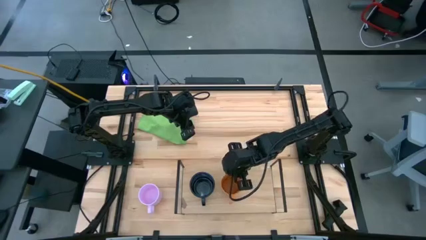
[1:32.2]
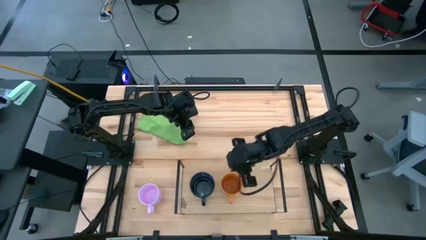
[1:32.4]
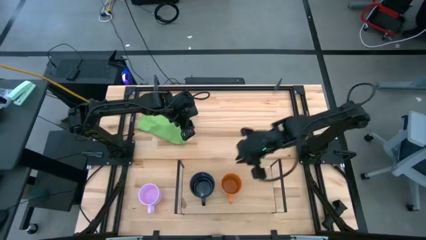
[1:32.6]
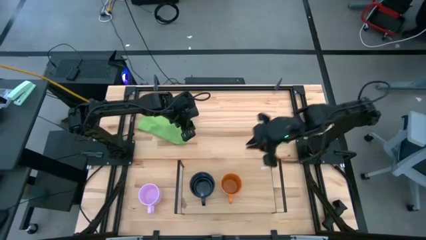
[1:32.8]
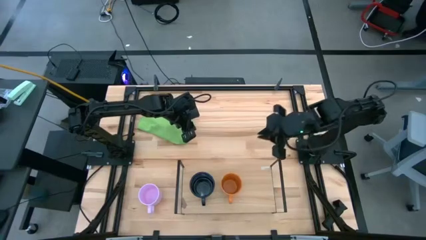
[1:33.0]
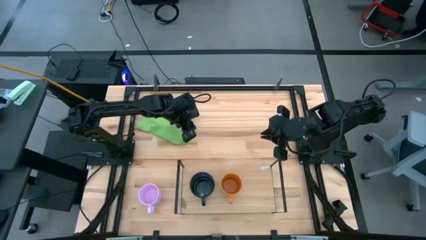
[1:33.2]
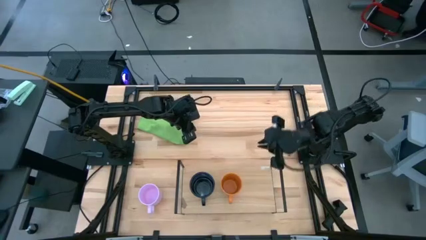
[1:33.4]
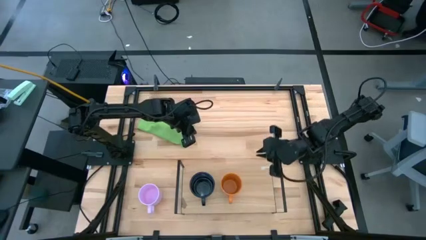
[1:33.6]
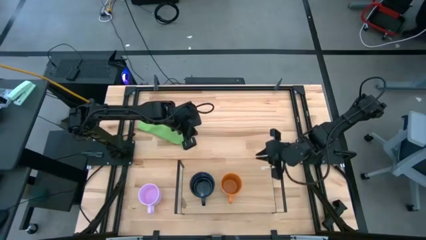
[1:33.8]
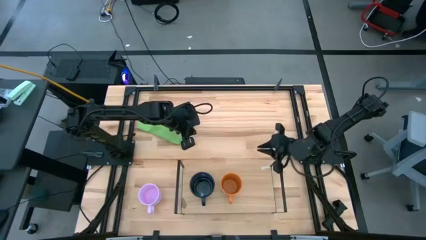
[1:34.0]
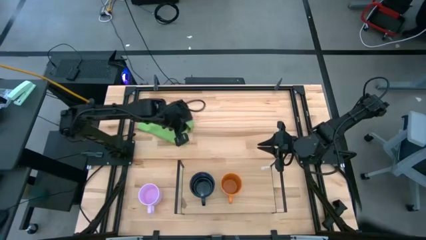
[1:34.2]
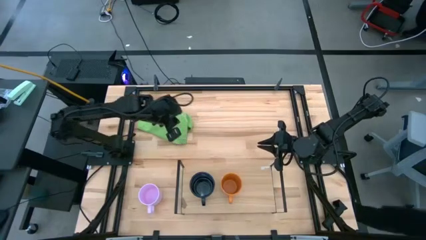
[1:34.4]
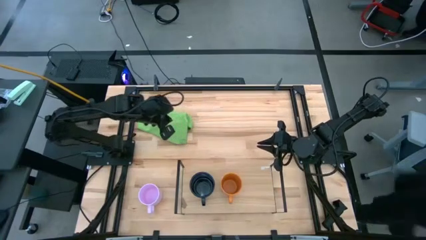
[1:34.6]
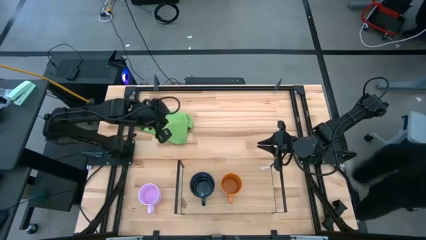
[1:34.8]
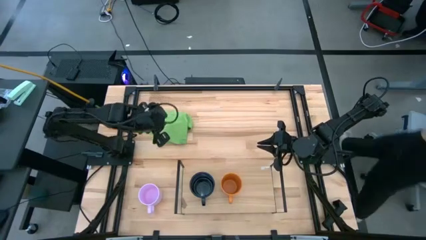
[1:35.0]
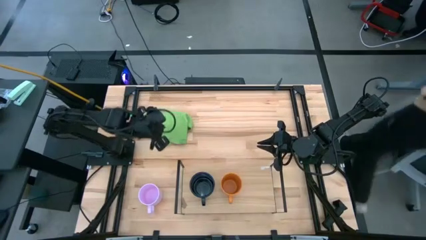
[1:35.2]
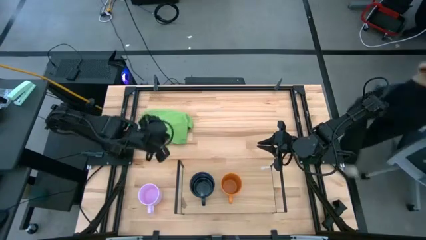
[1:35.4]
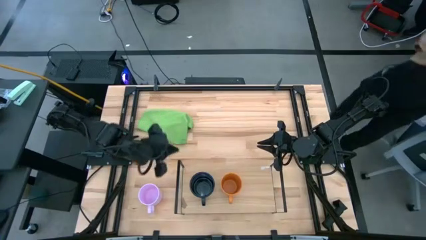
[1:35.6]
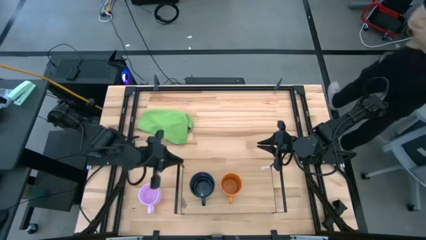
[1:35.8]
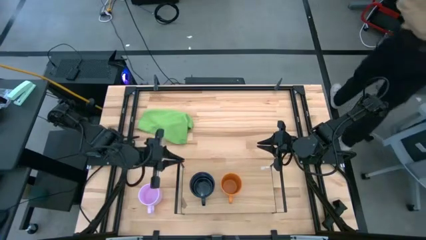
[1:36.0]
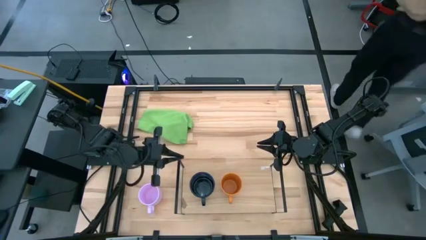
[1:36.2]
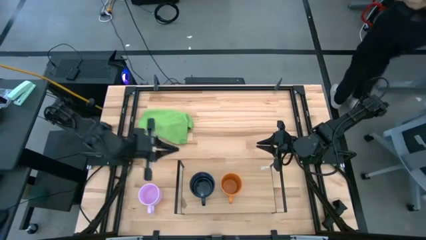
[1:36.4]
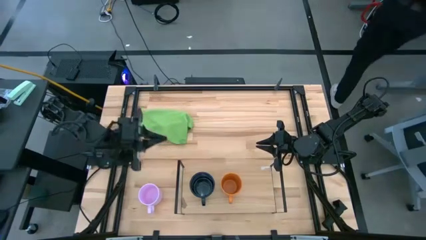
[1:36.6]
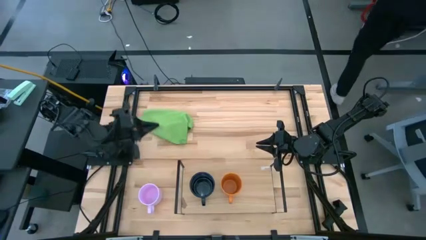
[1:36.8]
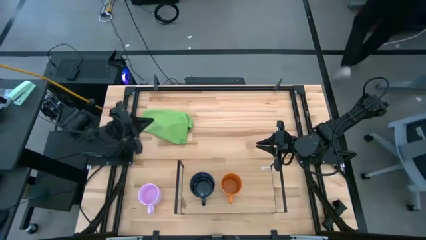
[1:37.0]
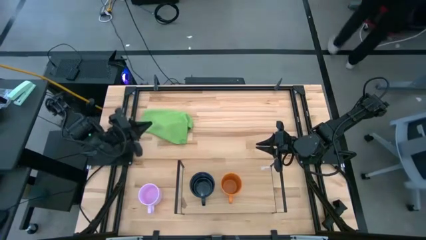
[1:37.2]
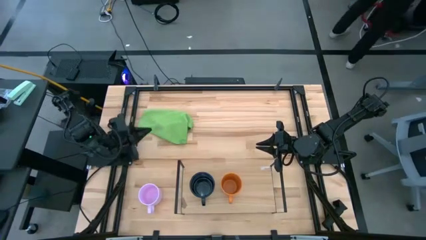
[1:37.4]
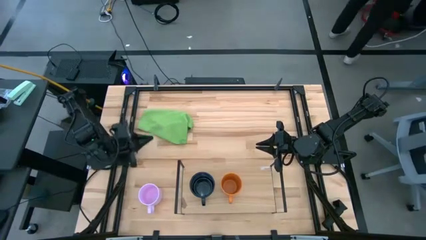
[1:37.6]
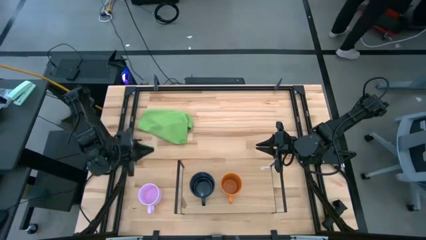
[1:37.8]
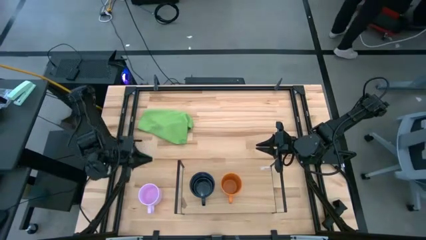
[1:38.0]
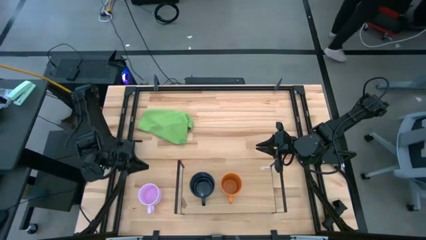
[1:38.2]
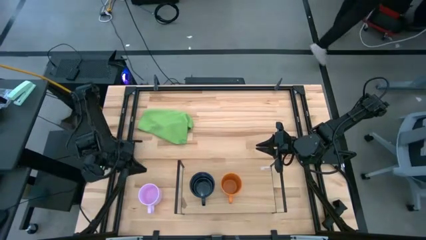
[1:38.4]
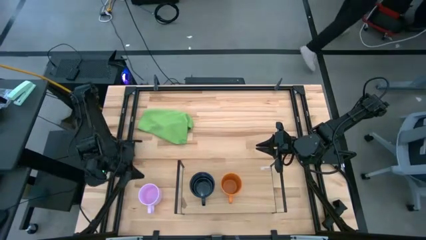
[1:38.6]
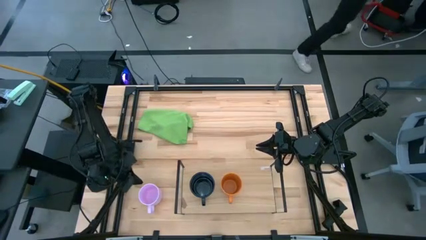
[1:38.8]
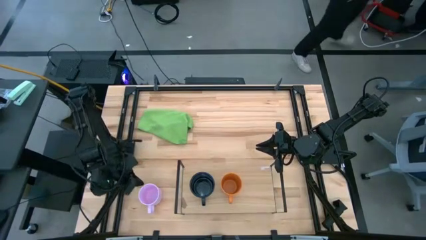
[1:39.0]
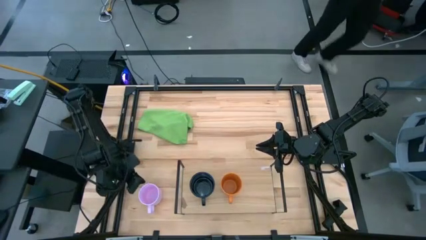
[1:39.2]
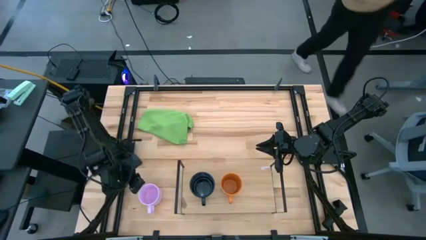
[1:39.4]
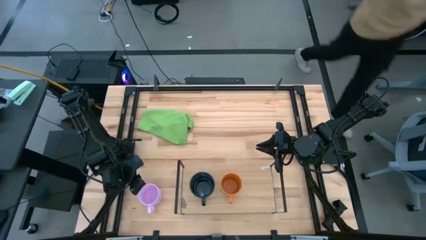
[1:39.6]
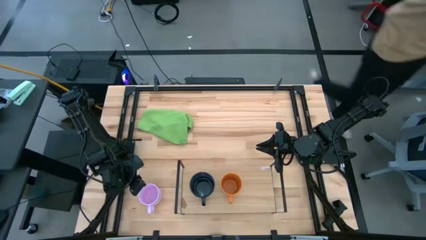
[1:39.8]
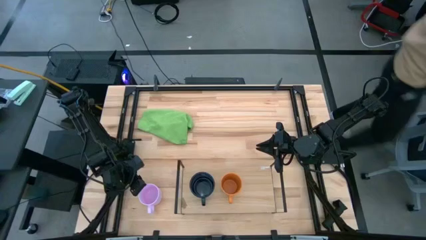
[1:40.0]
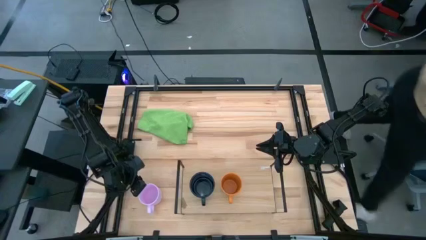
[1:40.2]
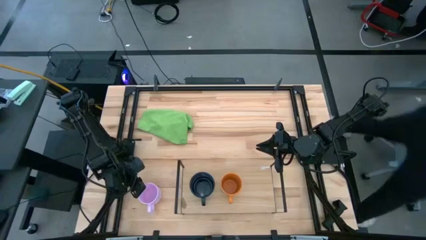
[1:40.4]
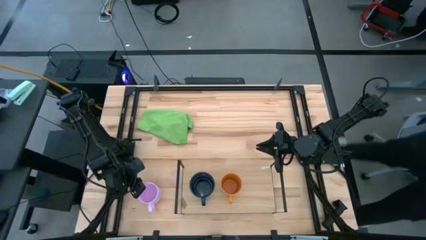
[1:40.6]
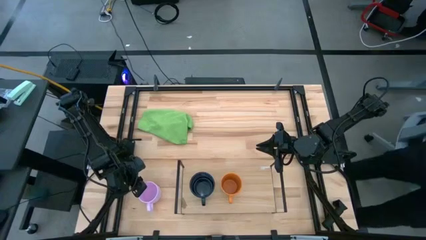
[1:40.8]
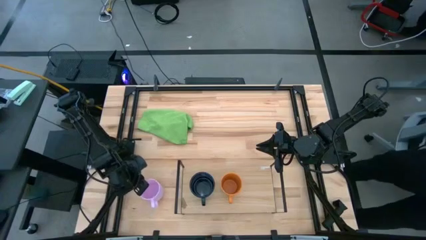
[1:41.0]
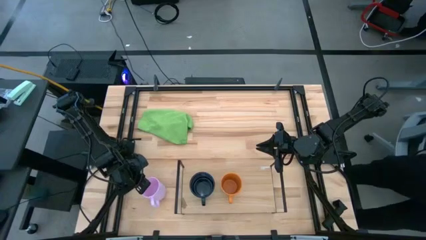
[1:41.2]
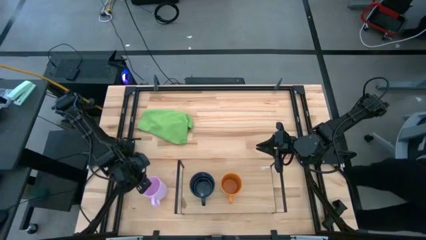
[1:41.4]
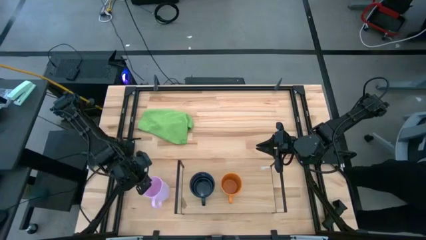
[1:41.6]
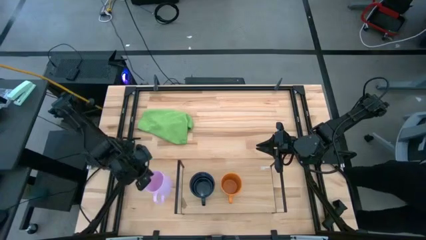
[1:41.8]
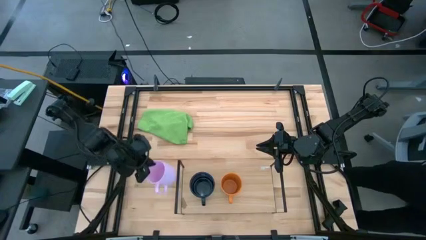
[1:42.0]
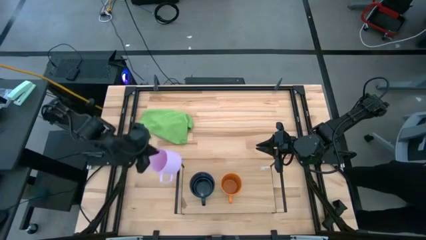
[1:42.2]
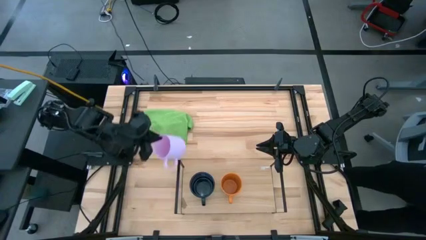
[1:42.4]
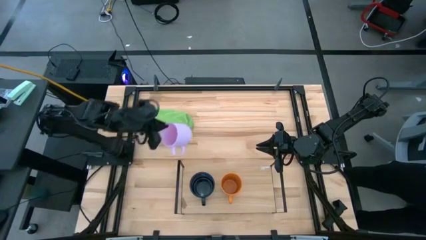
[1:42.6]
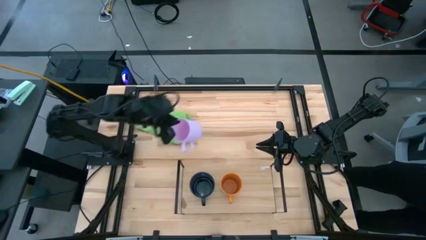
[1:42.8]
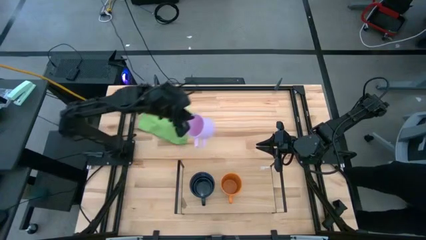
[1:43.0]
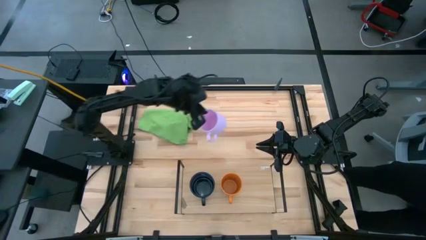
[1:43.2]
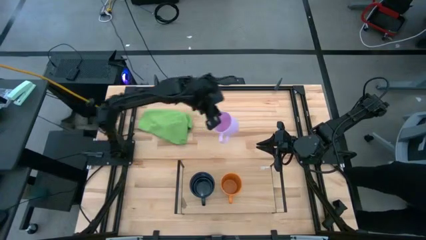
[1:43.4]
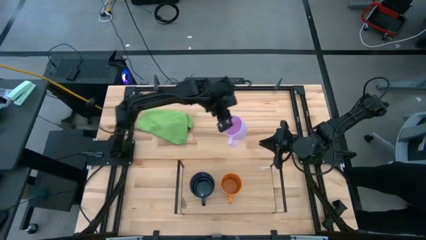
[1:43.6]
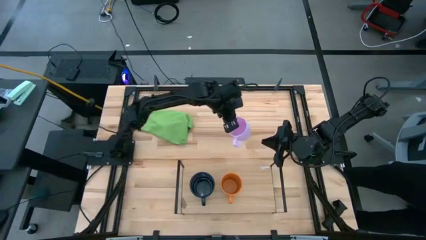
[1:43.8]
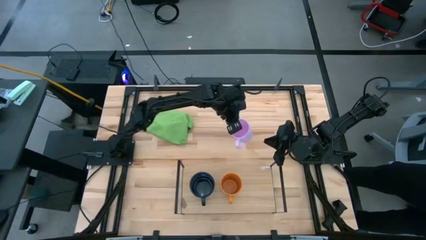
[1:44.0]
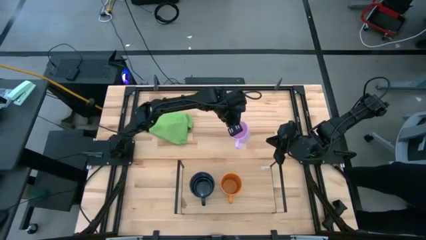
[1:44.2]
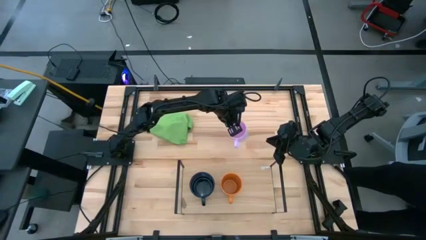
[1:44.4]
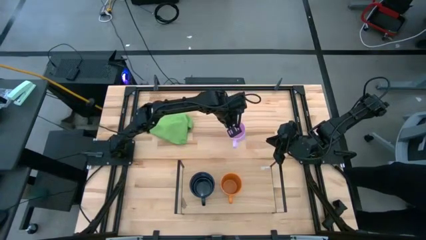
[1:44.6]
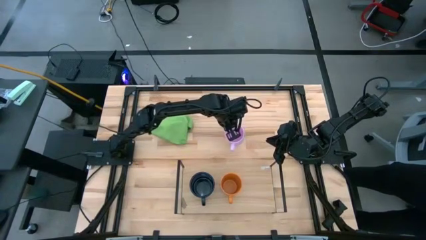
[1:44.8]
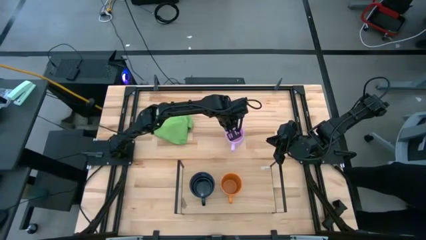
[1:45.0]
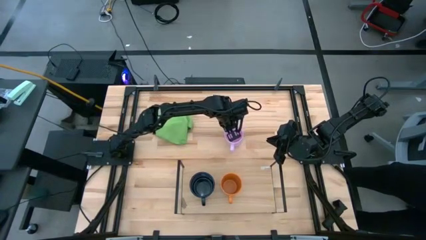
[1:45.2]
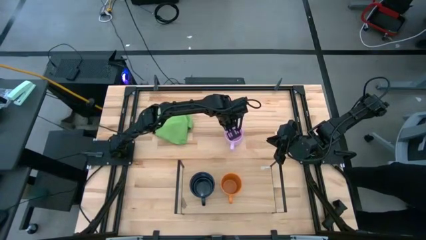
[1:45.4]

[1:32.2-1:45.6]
Task: Stack small to large cups/mugs on shelf
Put the pink mug on the shelf
